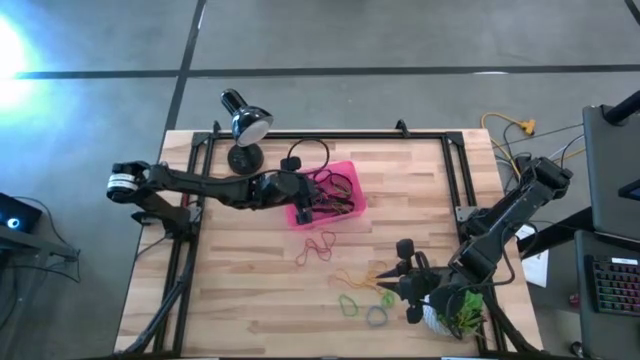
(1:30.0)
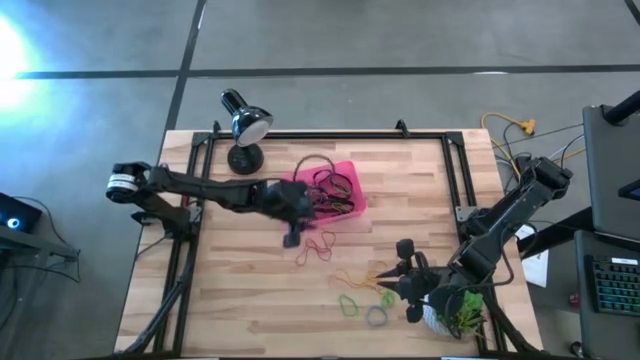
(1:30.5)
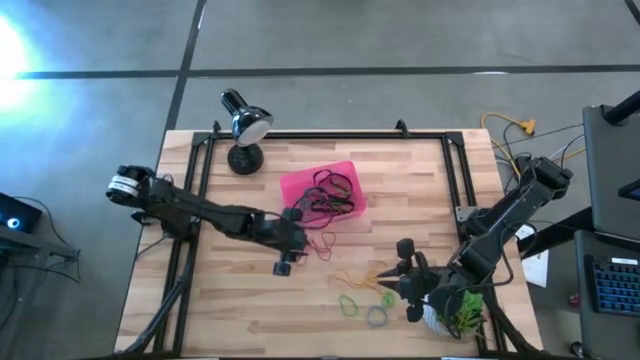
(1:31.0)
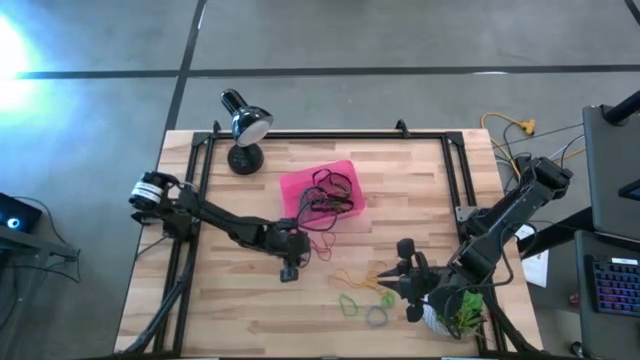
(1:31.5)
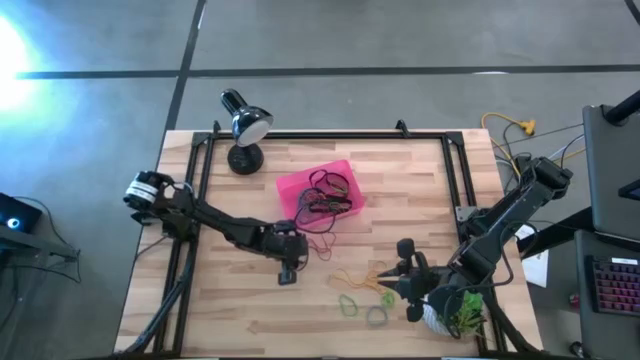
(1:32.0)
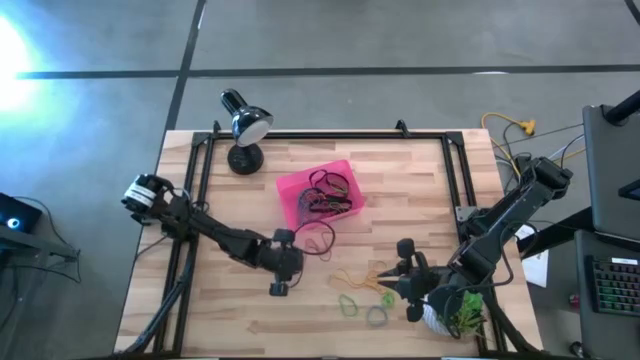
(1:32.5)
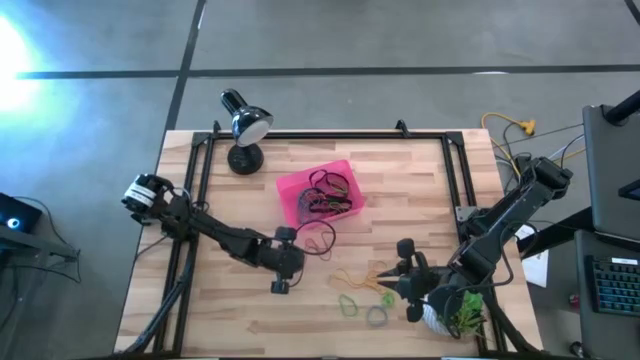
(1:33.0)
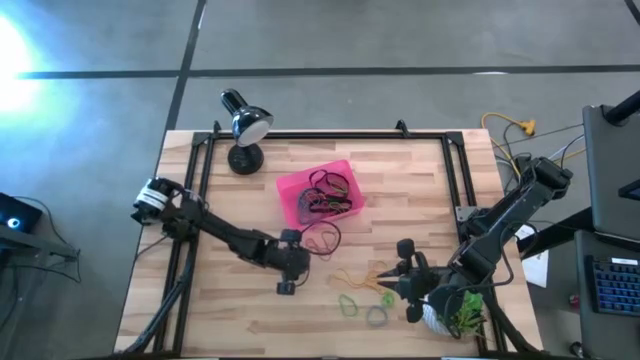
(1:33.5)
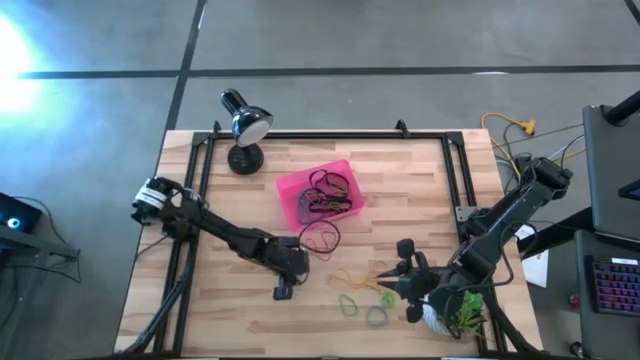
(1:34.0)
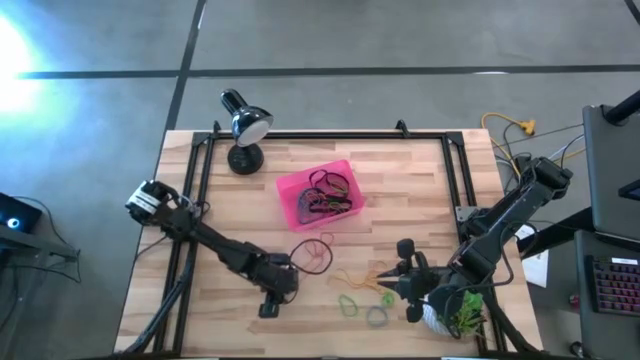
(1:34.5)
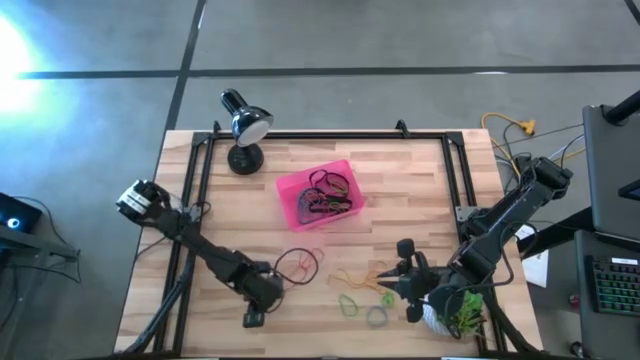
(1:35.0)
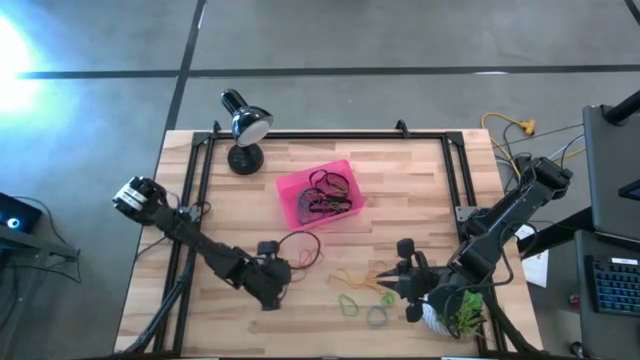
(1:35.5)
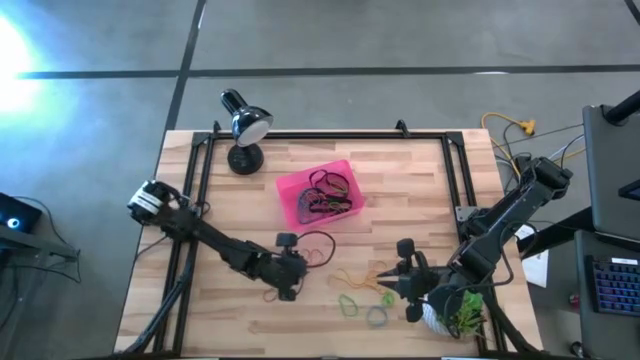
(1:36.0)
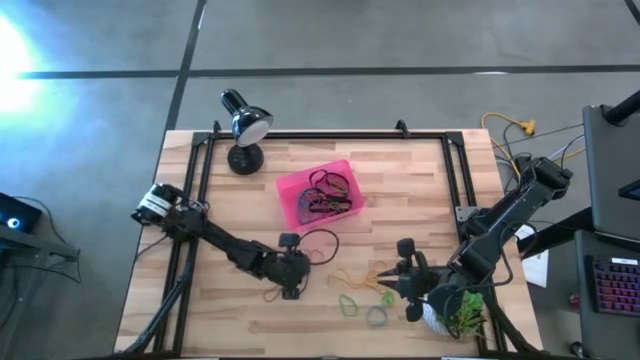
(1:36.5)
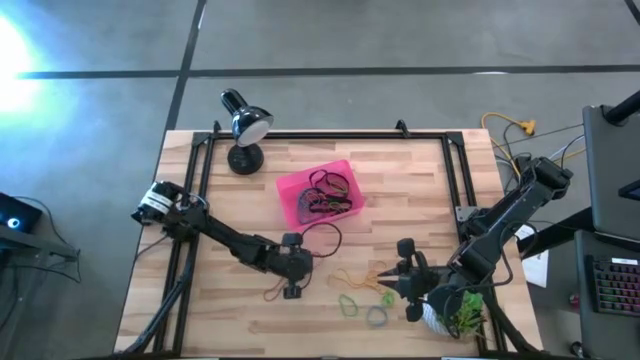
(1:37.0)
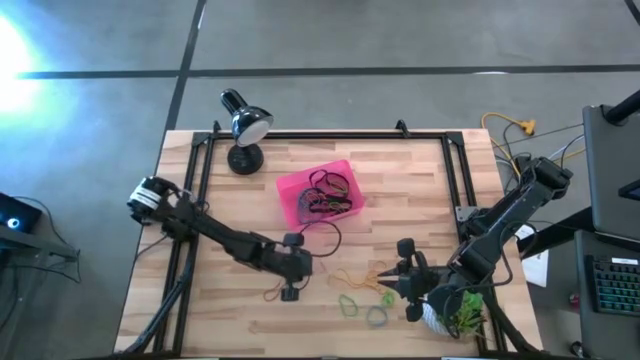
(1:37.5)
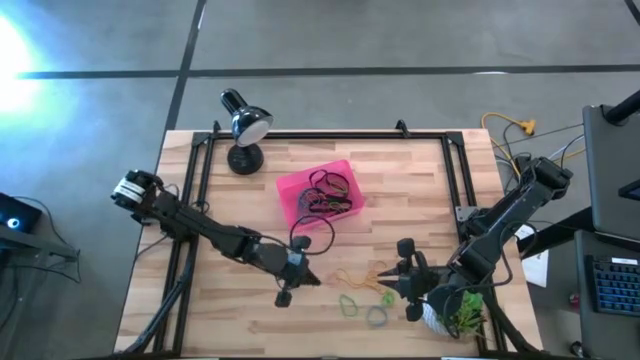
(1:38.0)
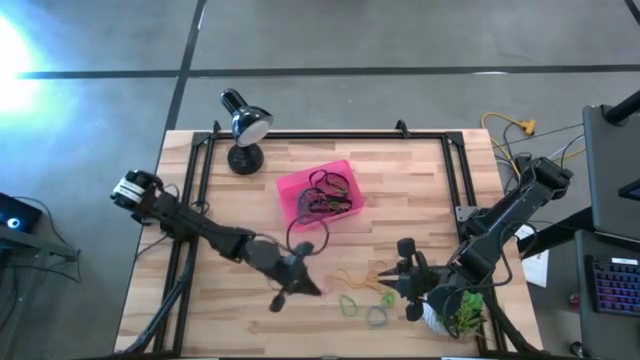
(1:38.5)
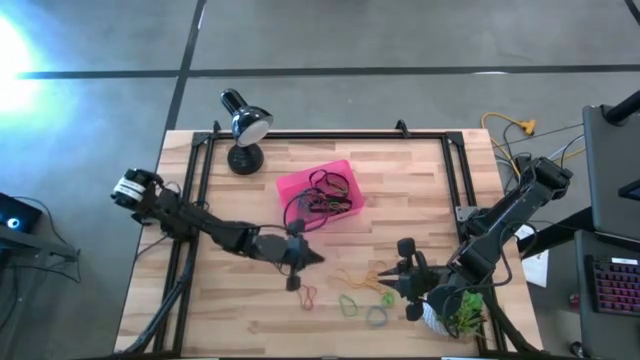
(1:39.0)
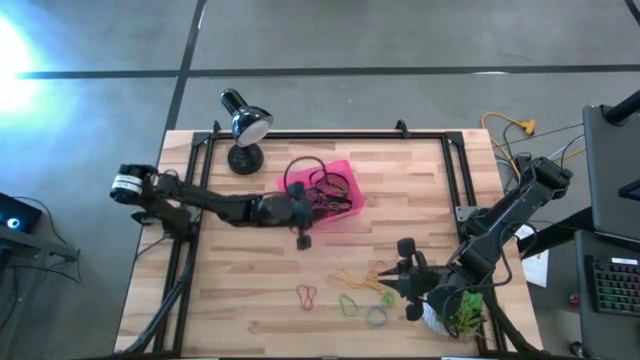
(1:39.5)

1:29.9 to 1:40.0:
Task: Pick and place rubber bands into bin
Put the red rubber band into the red bin

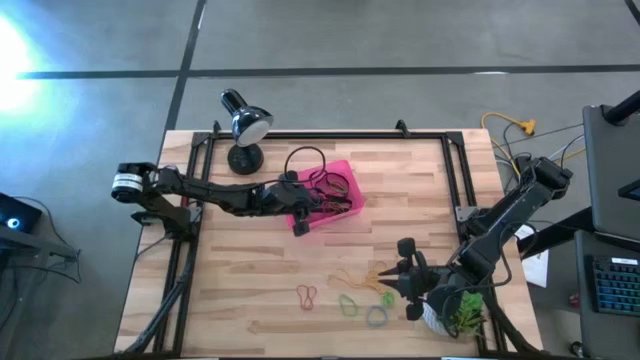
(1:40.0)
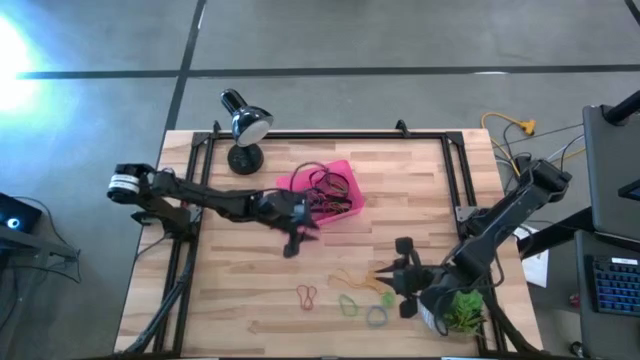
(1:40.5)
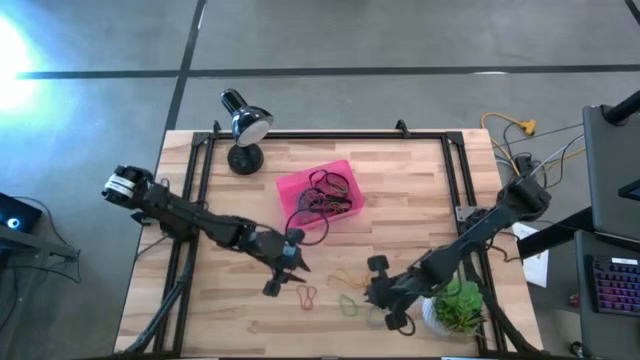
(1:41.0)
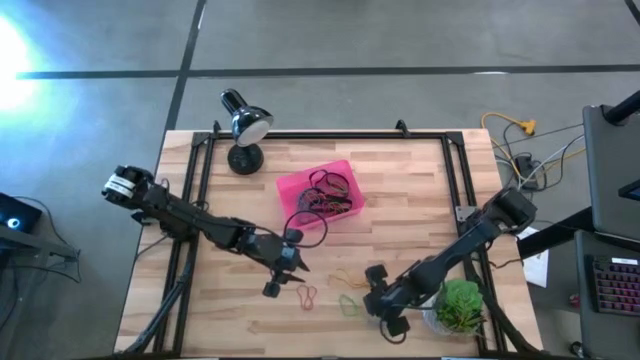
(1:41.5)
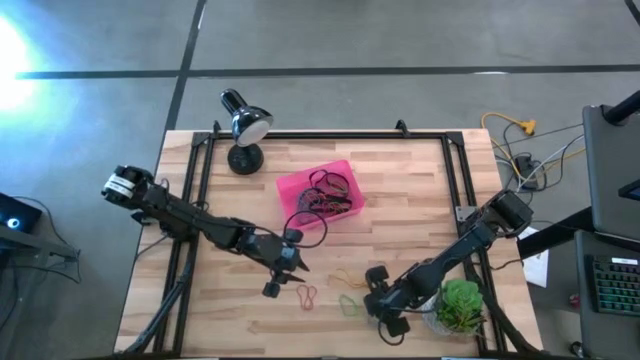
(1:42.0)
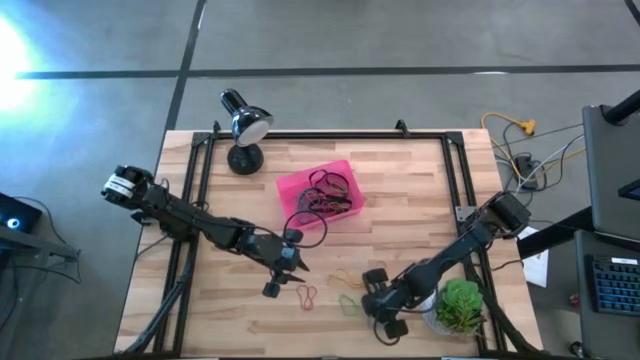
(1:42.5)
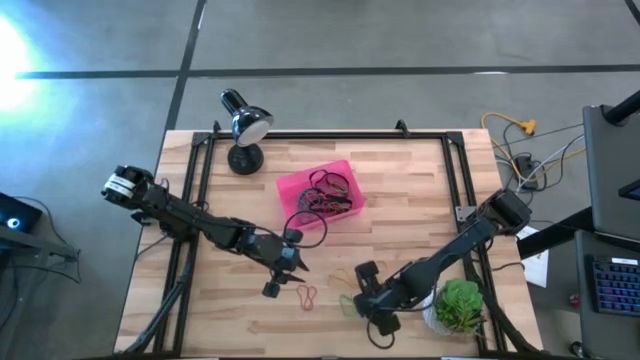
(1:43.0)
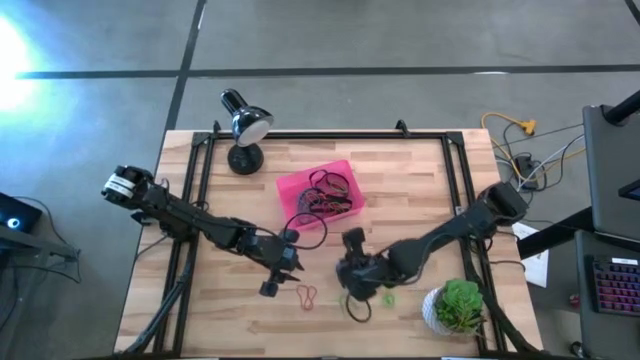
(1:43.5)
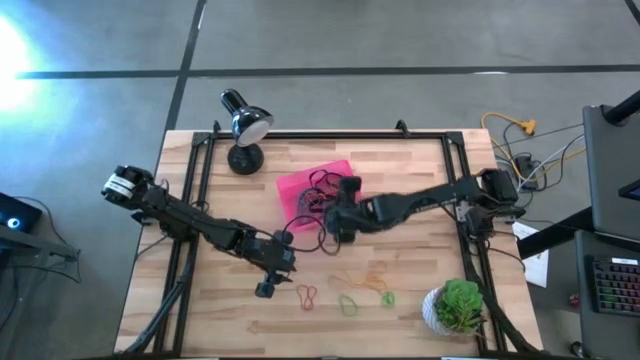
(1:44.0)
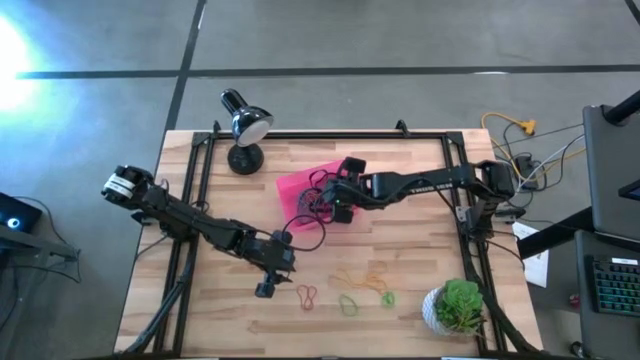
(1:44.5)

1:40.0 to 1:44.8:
Put the blue rubber band into the red bin

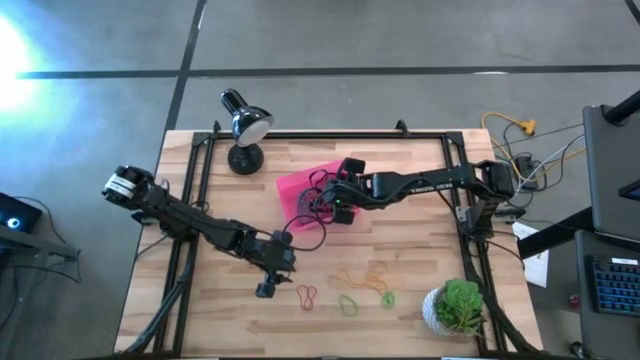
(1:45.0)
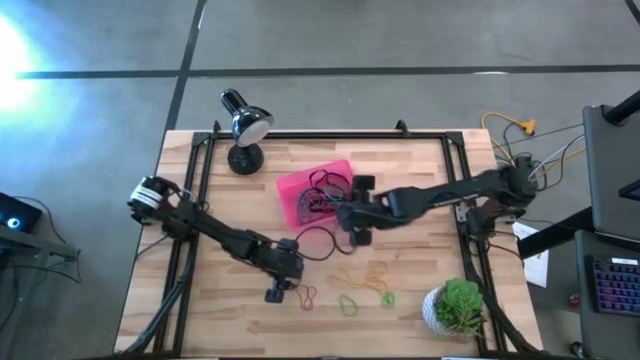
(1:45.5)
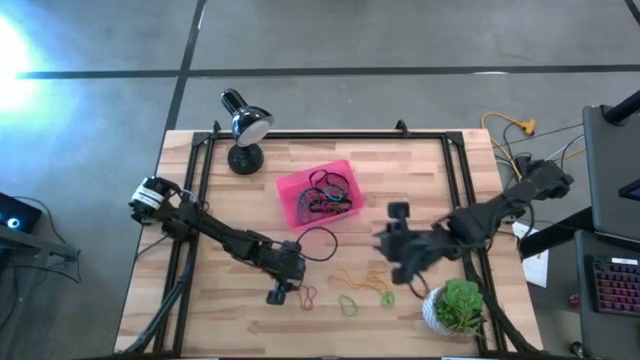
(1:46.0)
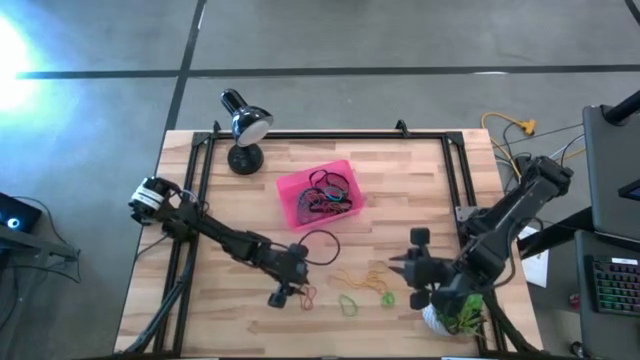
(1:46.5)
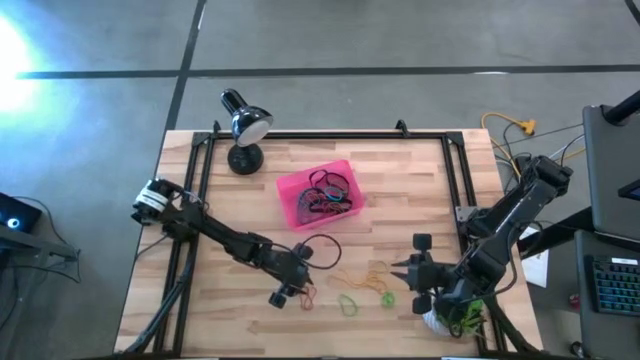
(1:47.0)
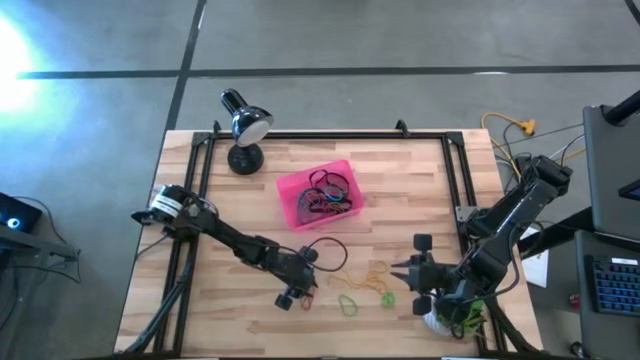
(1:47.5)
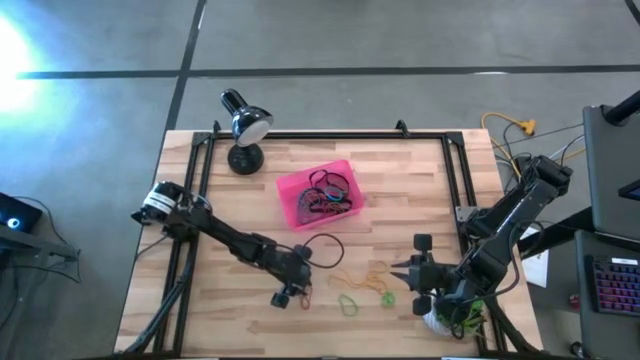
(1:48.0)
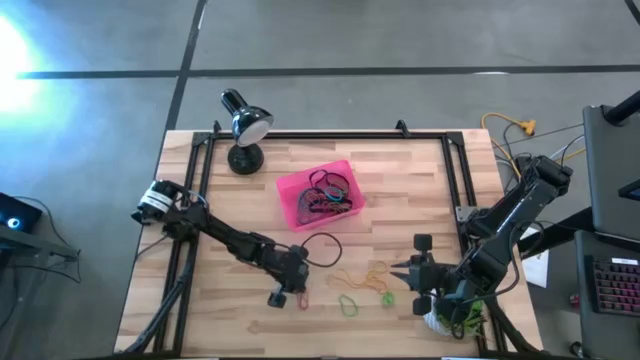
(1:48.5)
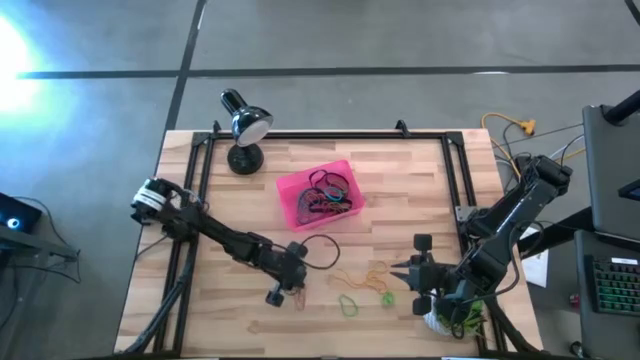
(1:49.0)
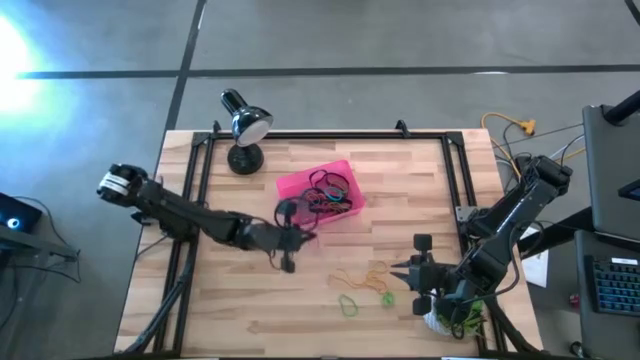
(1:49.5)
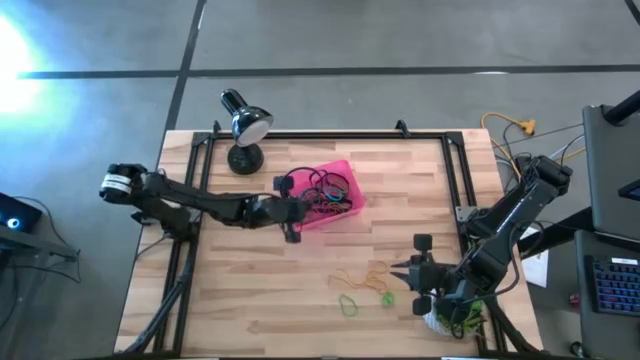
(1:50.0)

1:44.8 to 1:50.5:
Put the red rubber band into the red bin
